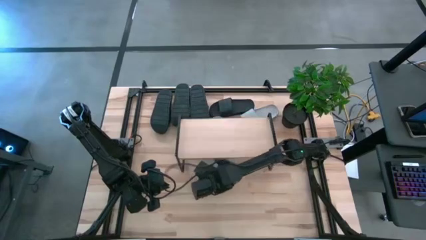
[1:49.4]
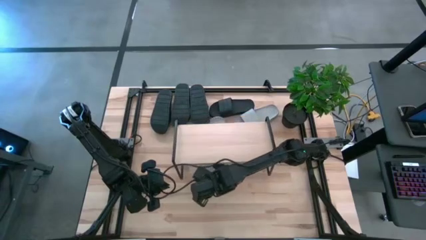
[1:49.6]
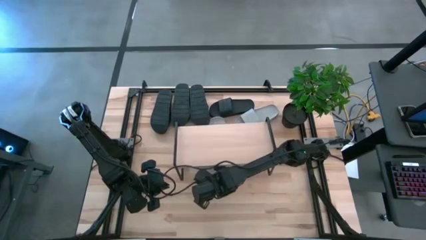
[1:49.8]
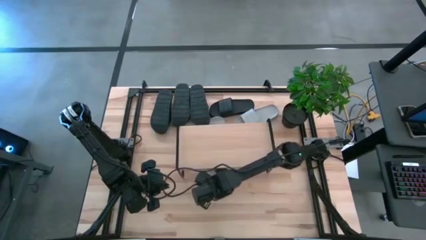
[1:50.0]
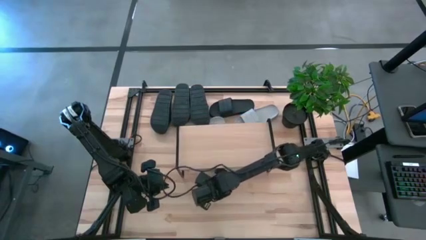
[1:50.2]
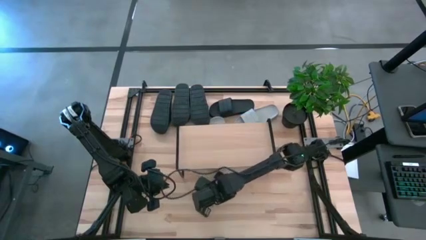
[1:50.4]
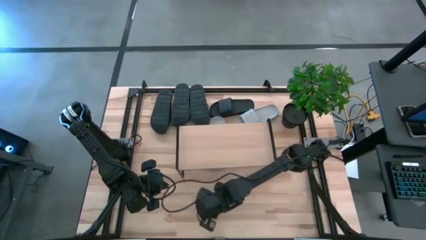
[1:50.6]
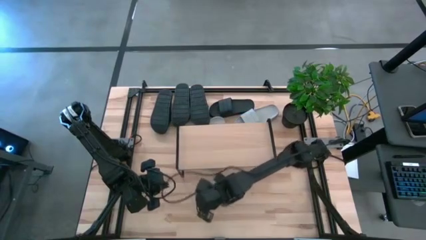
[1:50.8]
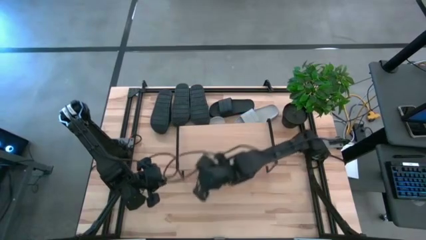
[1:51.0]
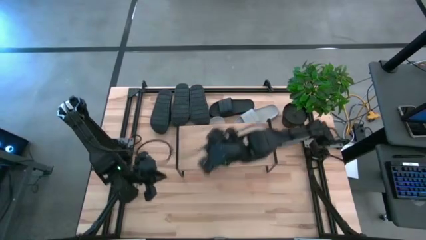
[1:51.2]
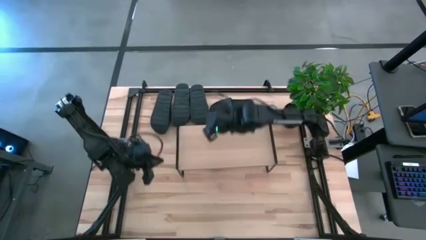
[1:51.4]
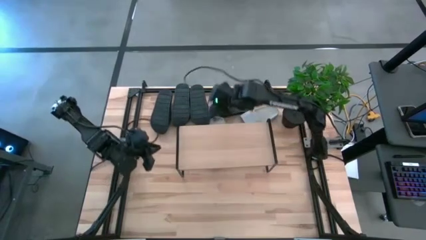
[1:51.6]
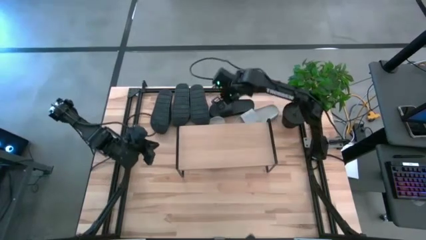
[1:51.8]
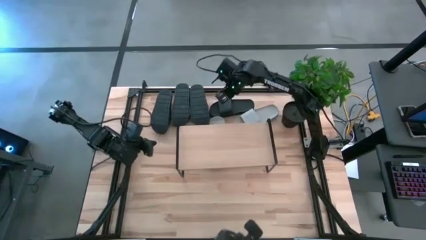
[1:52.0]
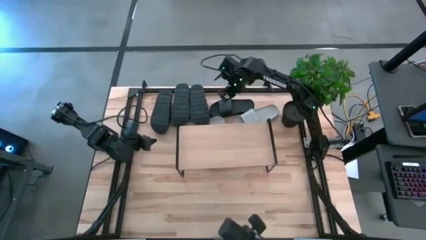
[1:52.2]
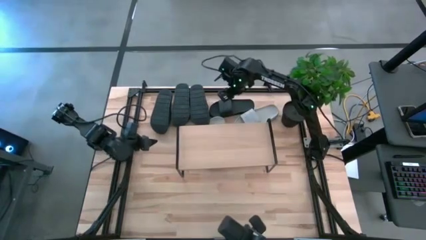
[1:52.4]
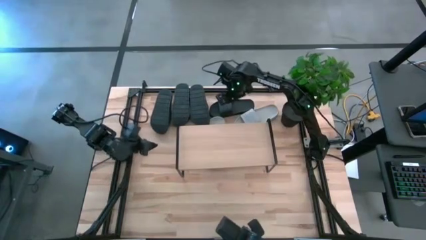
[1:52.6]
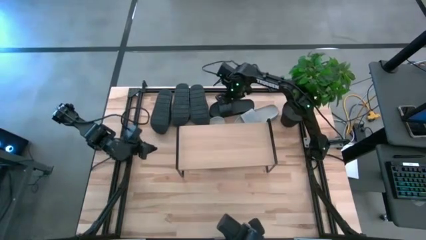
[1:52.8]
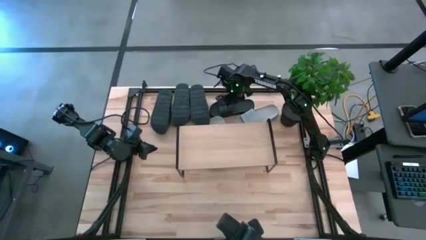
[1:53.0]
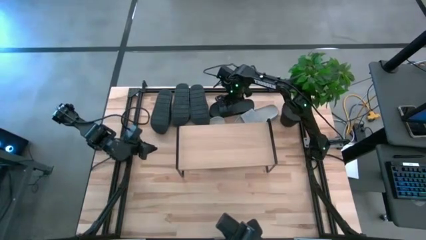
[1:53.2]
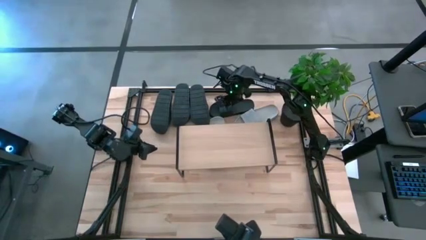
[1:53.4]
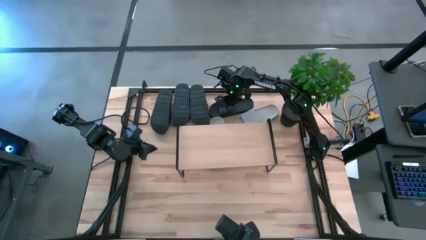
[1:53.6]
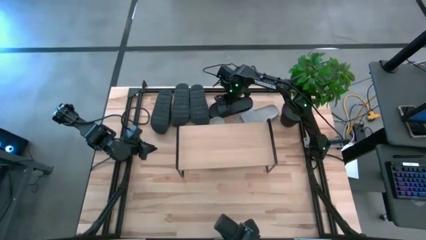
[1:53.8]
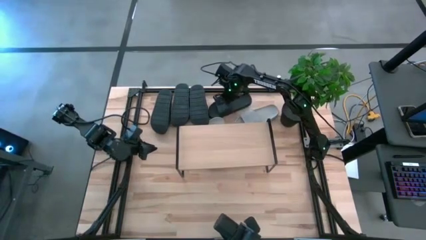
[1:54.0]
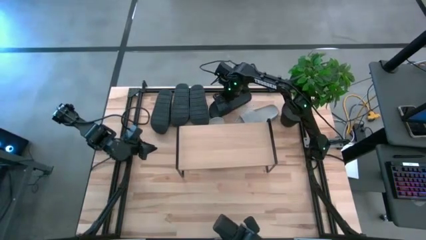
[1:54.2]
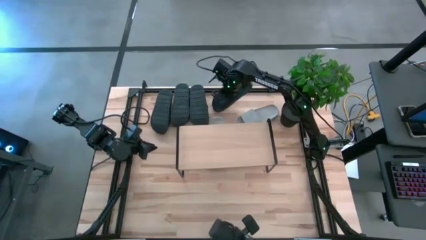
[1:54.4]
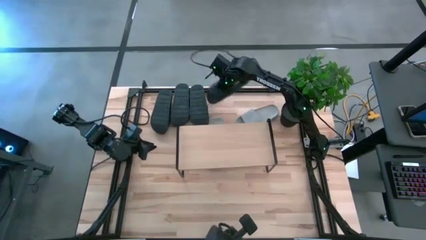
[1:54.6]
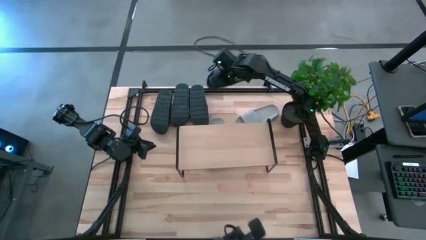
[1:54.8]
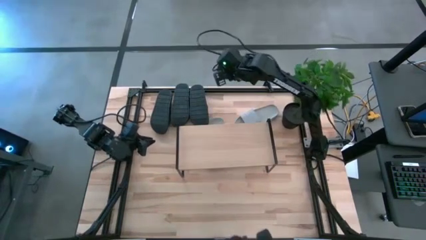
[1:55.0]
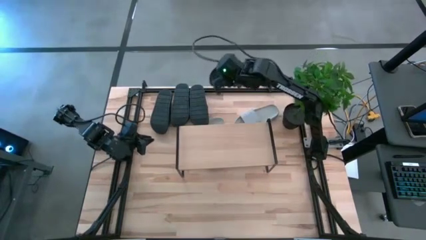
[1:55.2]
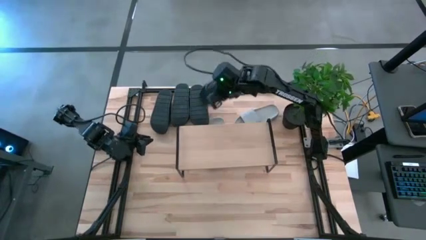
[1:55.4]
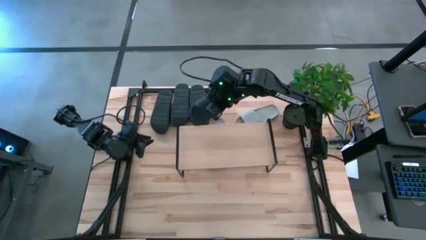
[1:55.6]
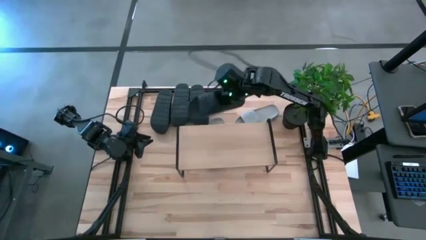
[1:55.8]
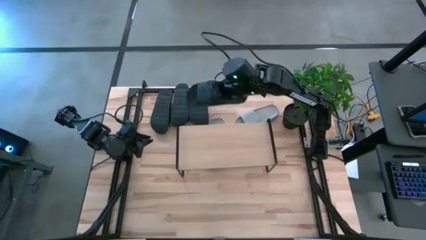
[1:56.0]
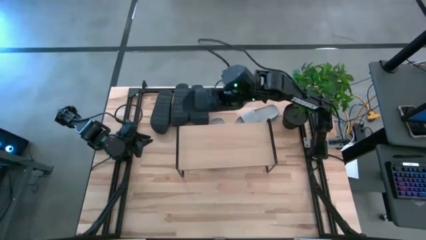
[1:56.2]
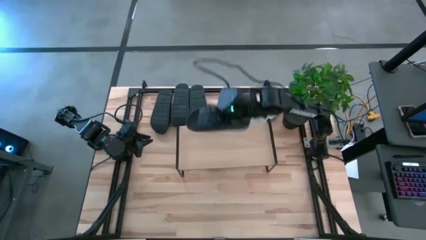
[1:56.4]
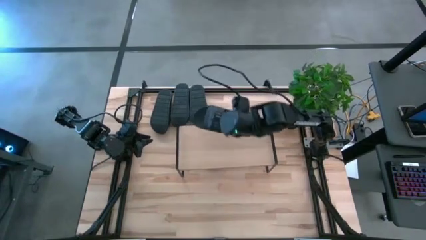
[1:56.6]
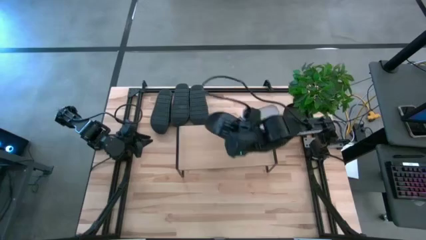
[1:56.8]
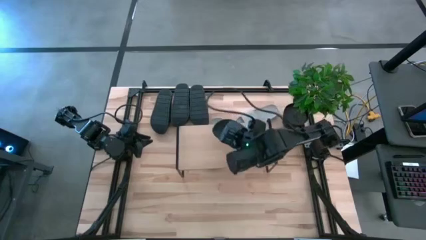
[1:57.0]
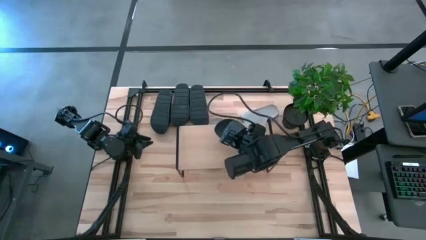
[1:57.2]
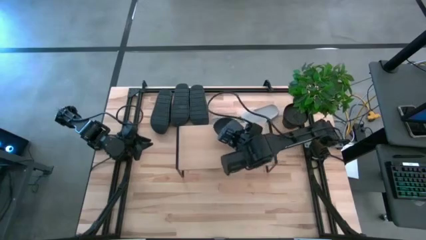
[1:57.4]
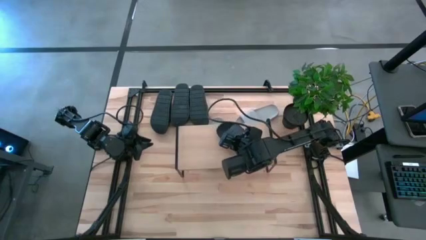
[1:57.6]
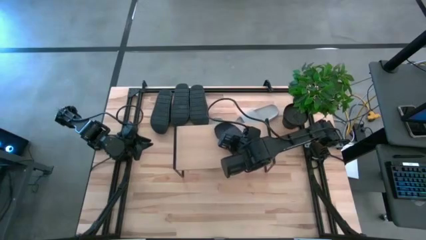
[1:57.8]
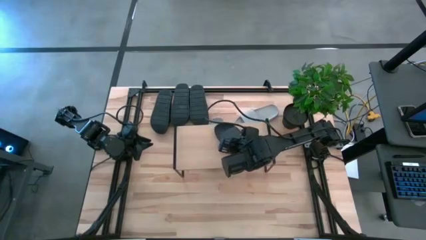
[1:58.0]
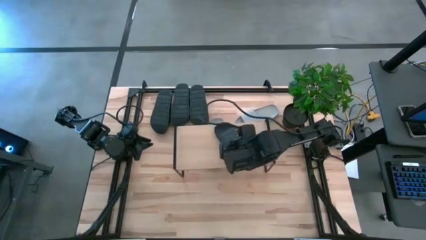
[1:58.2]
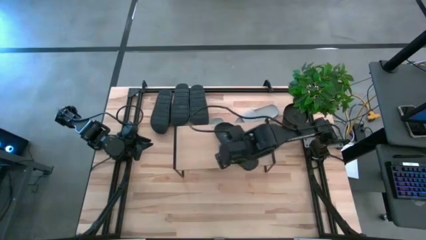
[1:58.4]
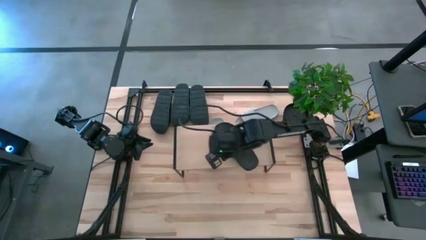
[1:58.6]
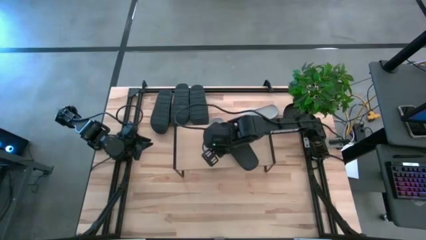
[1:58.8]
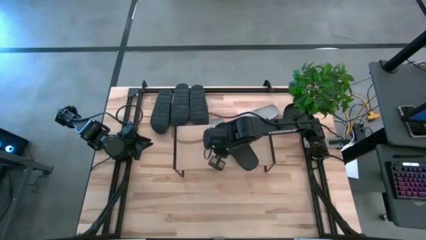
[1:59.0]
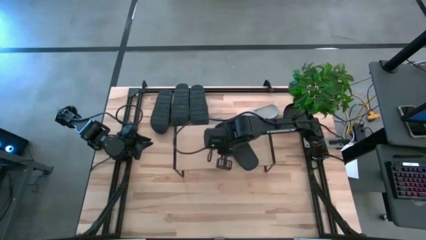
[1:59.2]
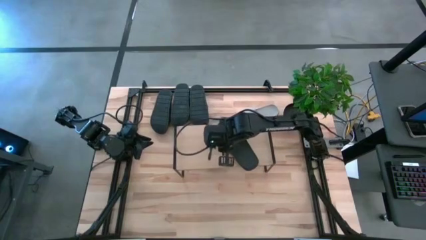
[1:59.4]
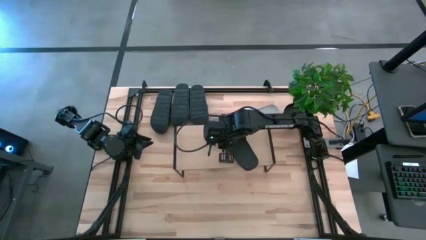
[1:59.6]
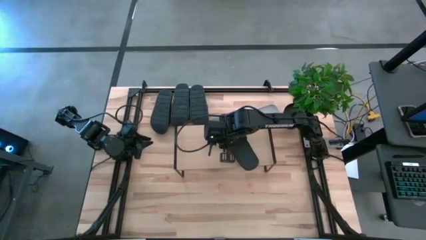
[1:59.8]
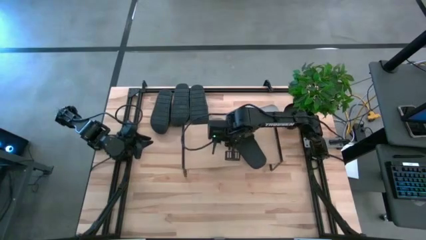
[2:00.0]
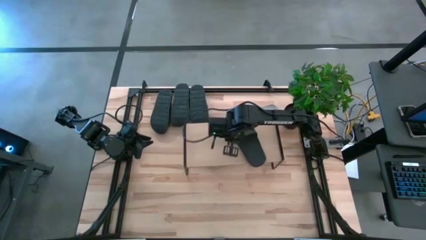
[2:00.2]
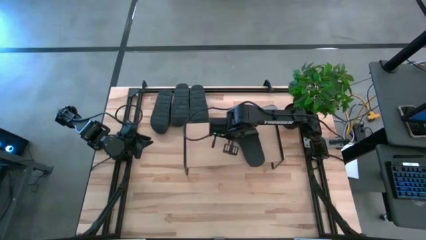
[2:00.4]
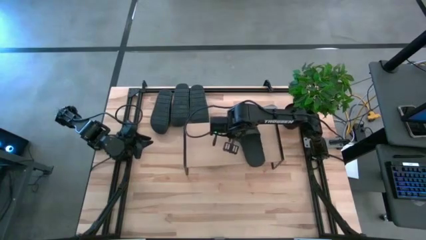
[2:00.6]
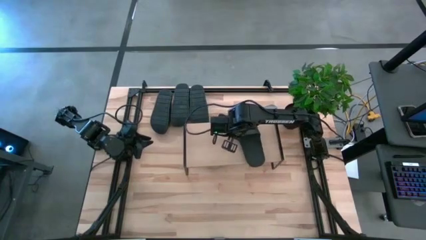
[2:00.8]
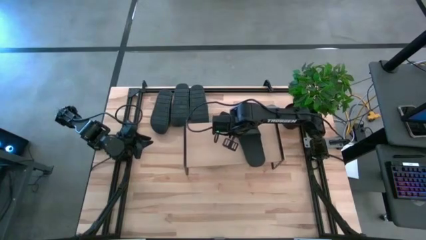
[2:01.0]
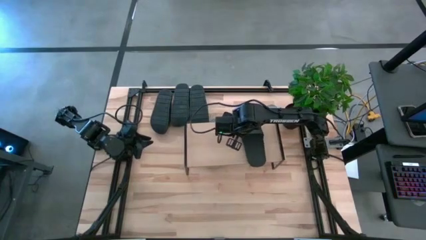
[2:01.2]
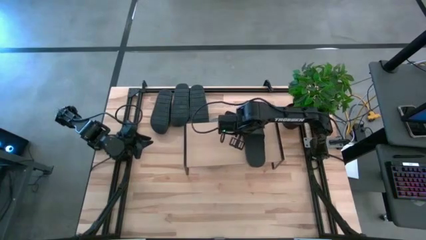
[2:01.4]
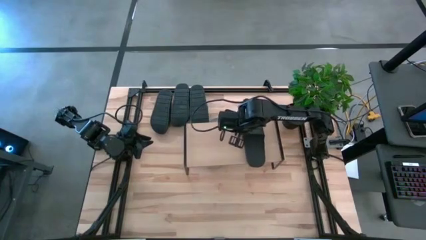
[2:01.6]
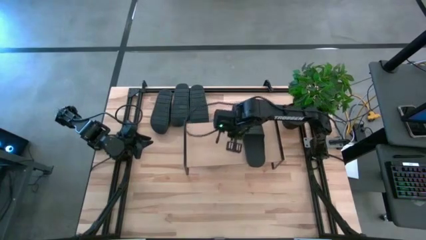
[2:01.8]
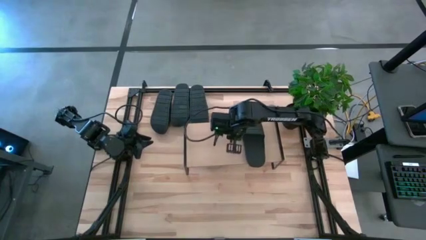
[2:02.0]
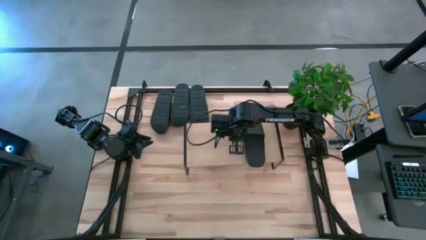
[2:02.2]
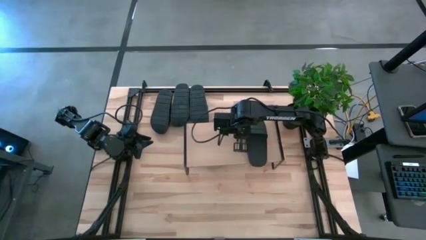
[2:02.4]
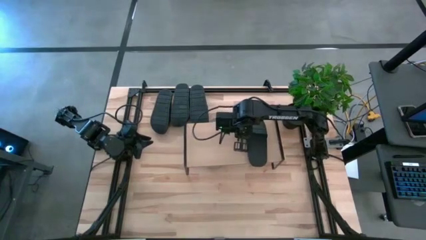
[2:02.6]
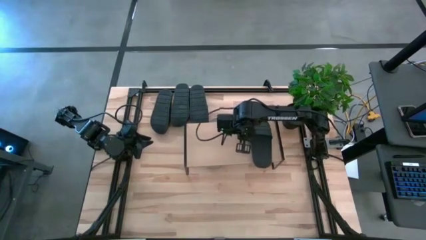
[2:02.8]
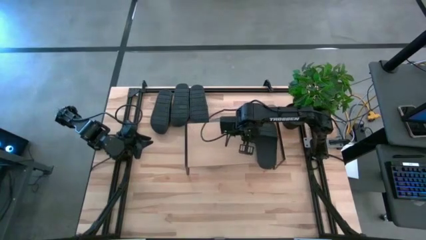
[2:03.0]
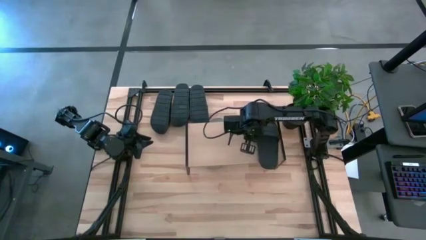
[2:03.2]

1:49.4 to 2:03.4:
Task: Pick and place slides into the shelf
Put the black slipper on the shelf
